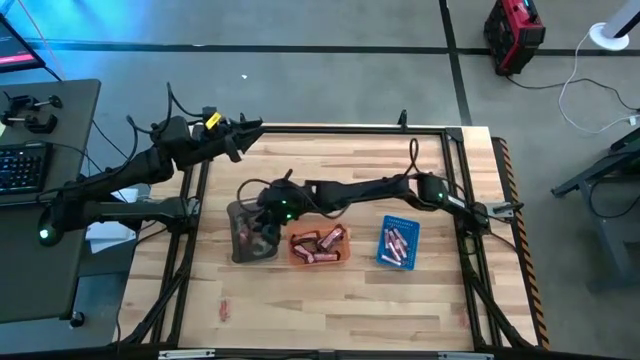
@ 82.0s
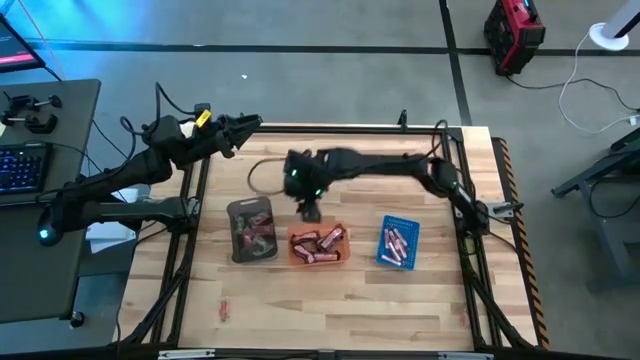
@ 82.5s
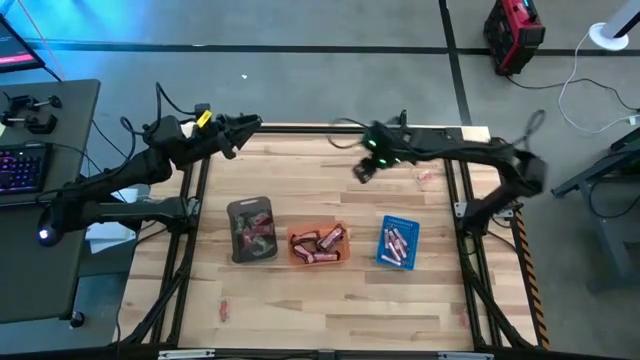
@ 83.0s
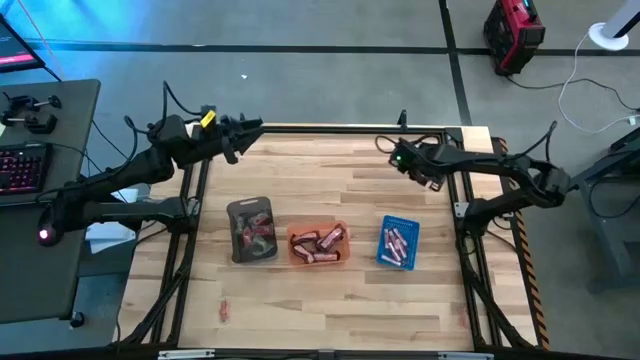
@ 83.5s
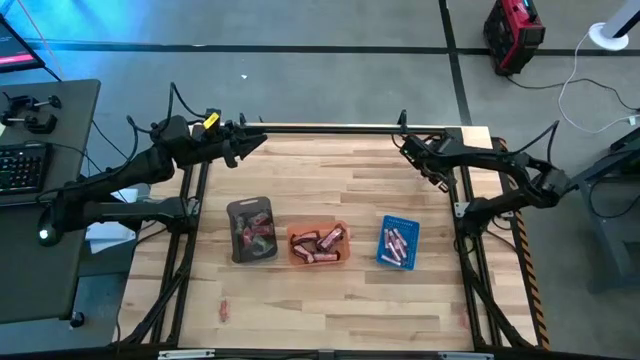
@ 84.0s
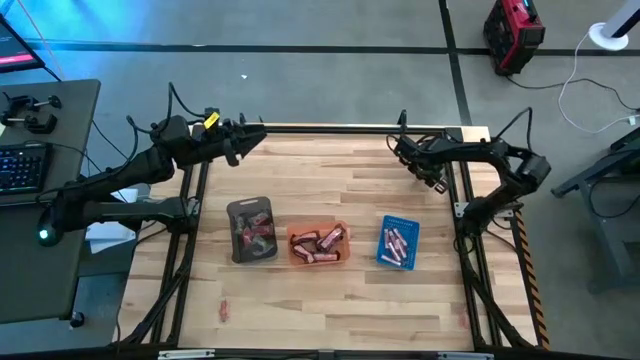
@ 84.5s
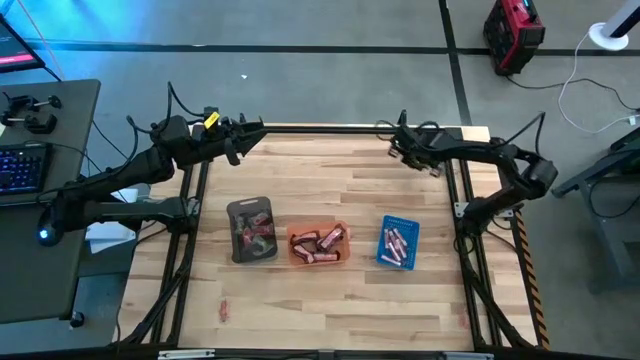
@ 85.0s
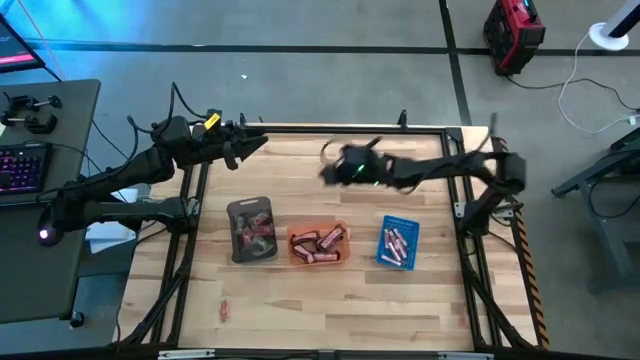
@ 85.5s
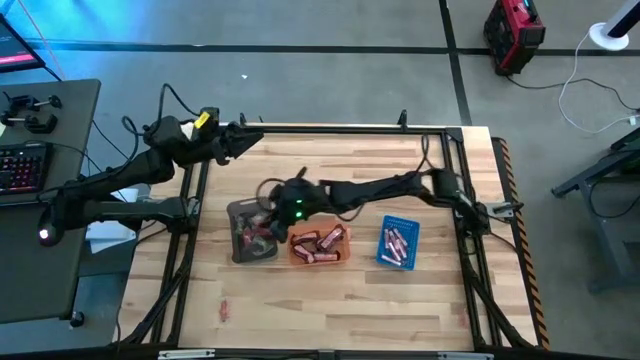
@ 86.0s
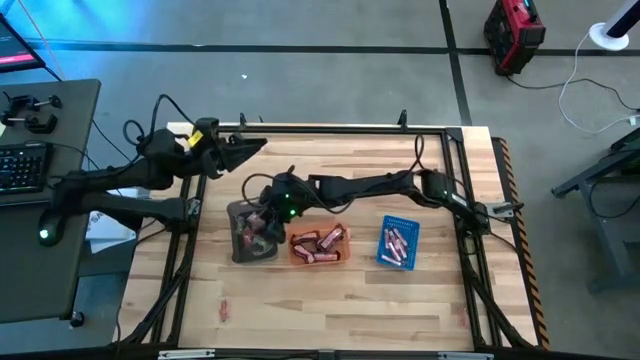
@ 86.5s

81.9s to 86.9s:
Task: Sort candy by brand, put in halloween buckets
Put the orange gummy into the black bin

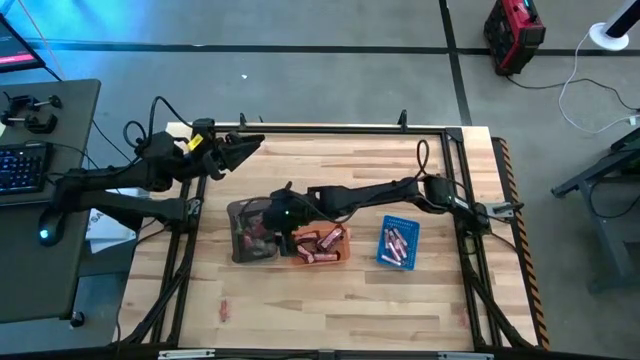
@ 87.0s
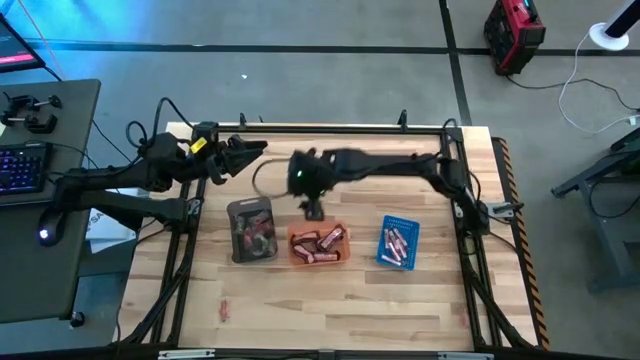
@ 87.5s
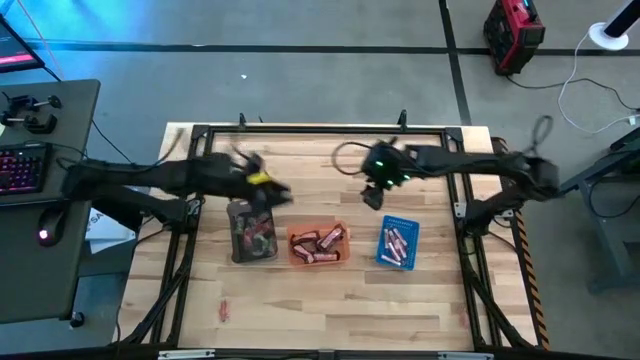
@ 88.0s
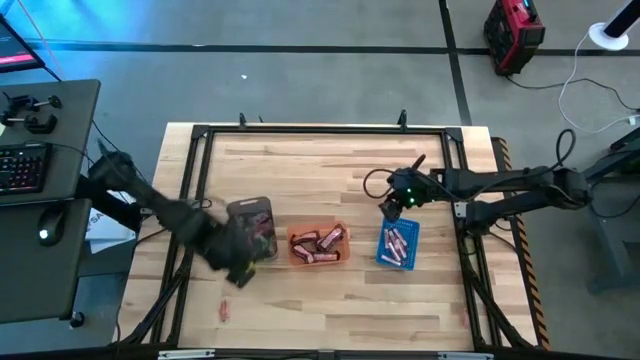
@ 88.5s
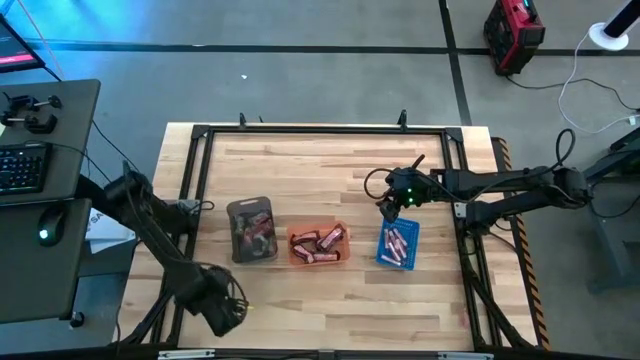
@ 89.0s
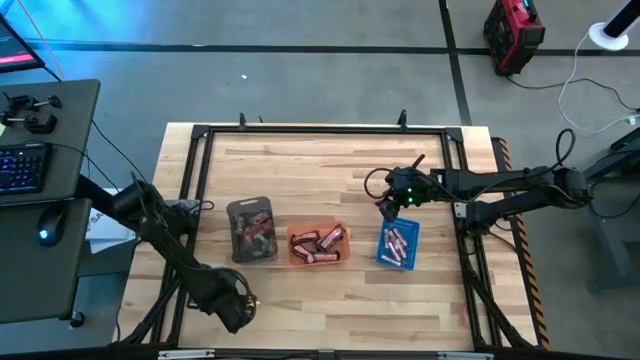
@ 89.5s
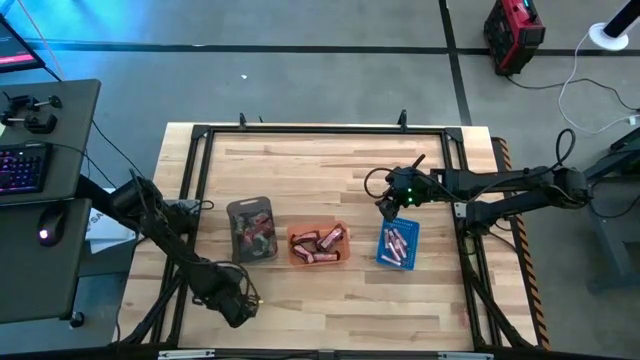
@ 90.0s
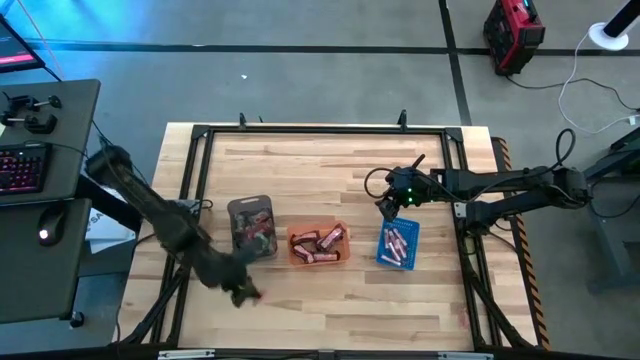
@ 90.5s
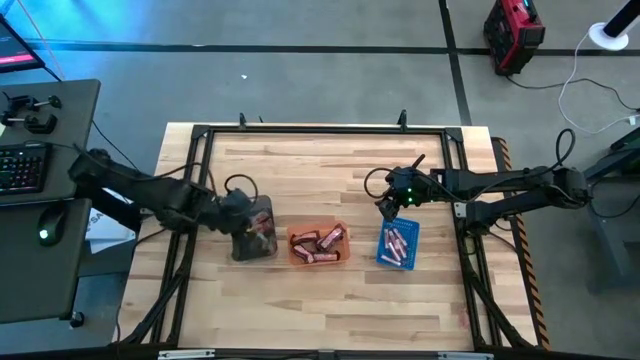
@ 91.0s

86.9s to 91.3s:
Put the orange gummy into the black bin

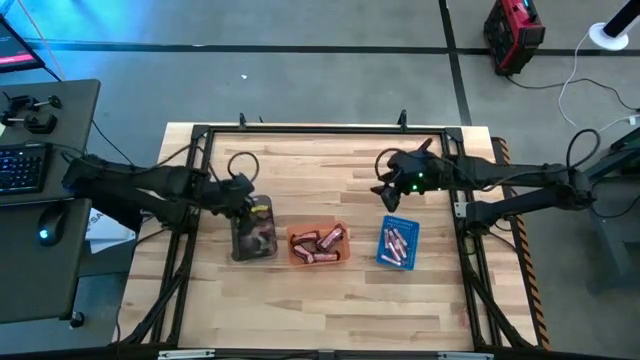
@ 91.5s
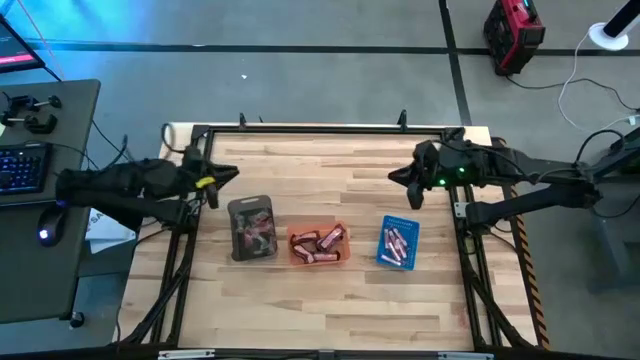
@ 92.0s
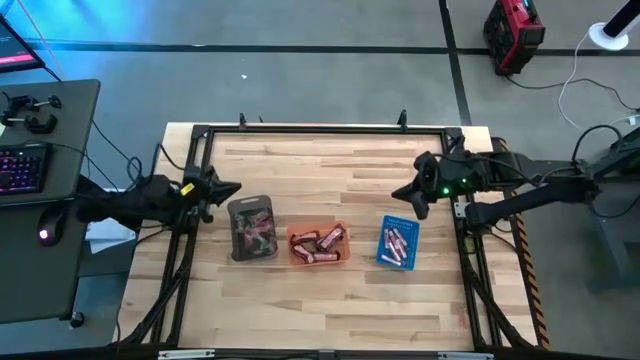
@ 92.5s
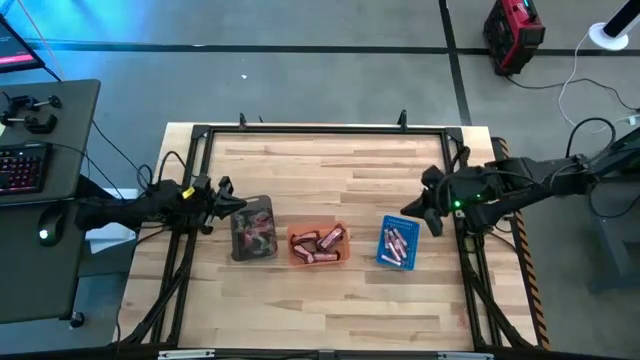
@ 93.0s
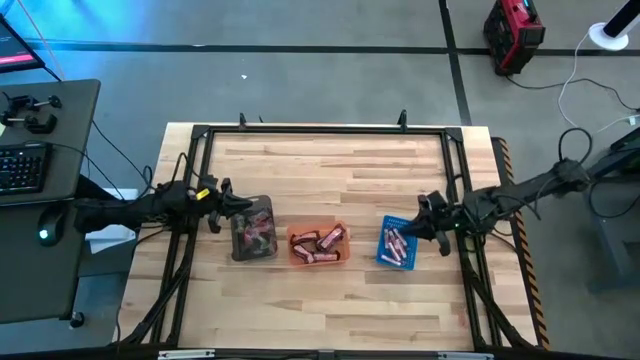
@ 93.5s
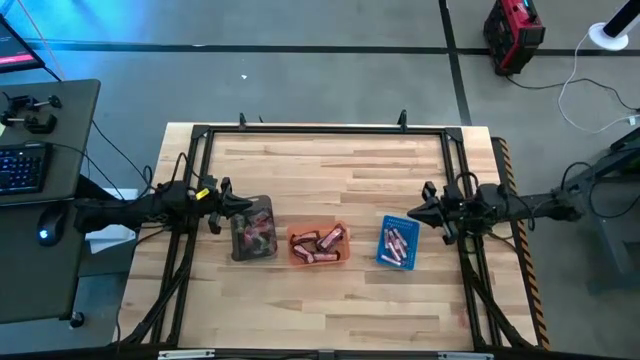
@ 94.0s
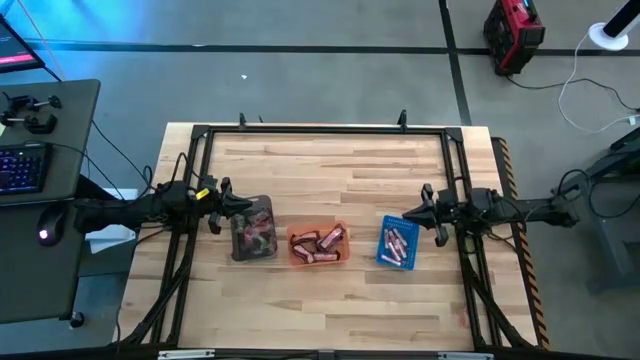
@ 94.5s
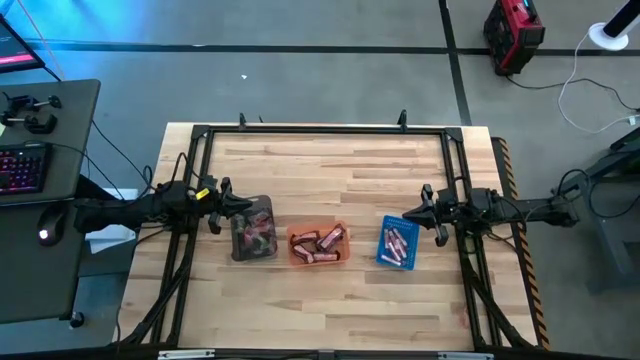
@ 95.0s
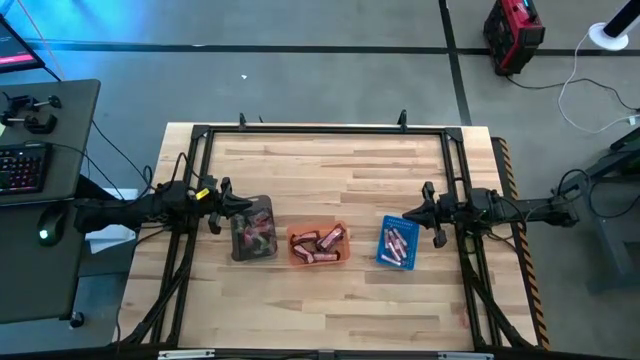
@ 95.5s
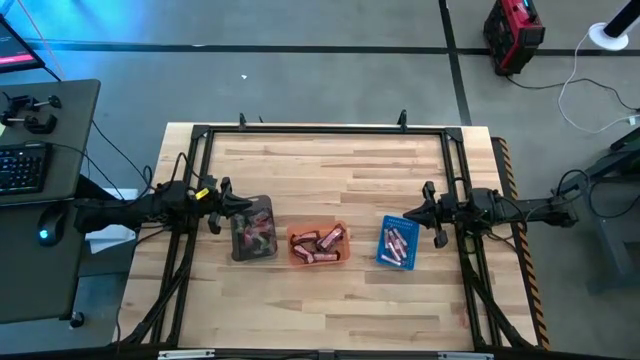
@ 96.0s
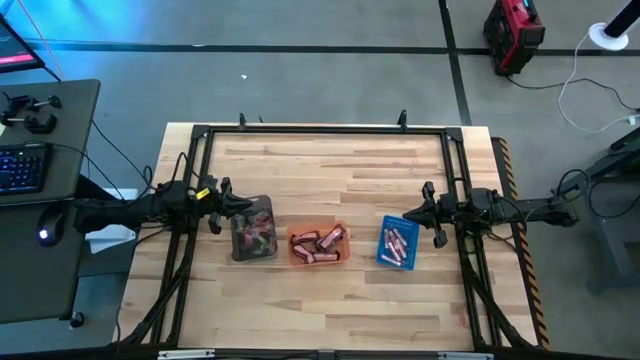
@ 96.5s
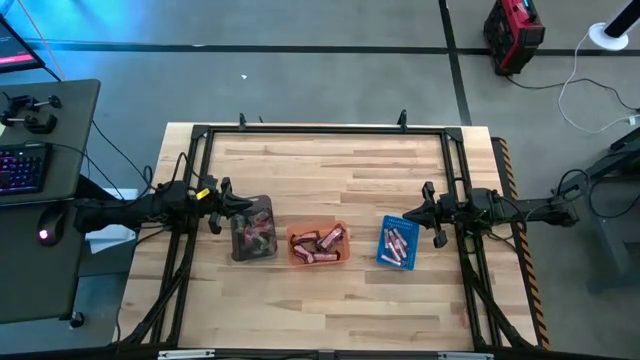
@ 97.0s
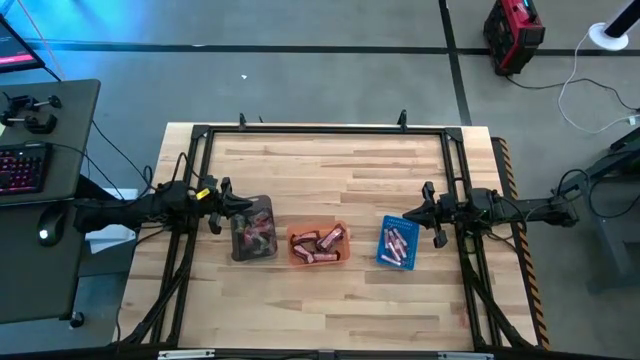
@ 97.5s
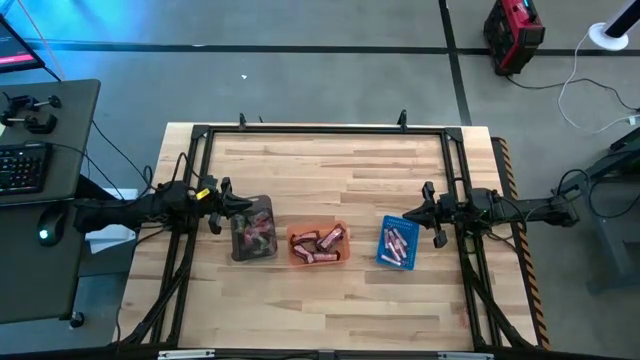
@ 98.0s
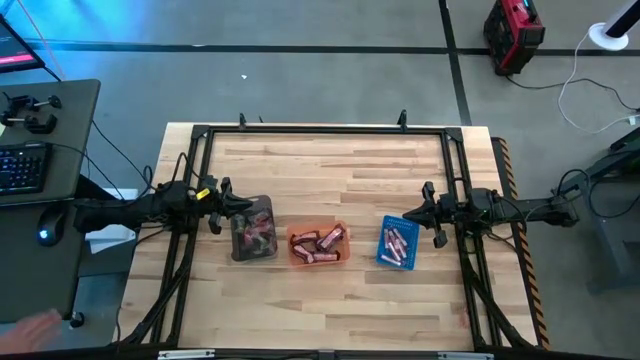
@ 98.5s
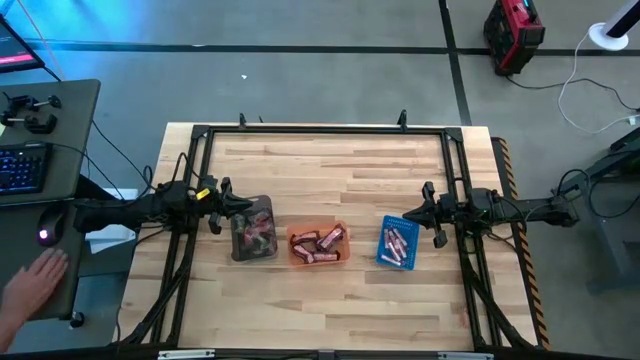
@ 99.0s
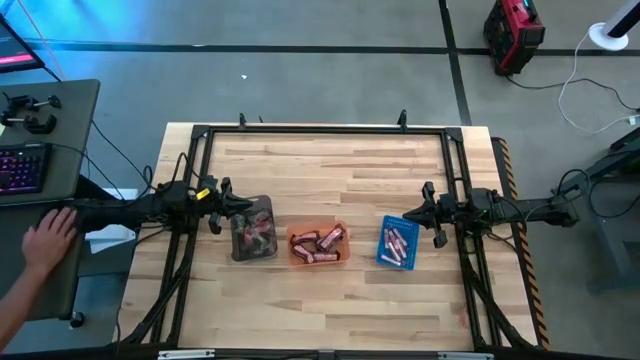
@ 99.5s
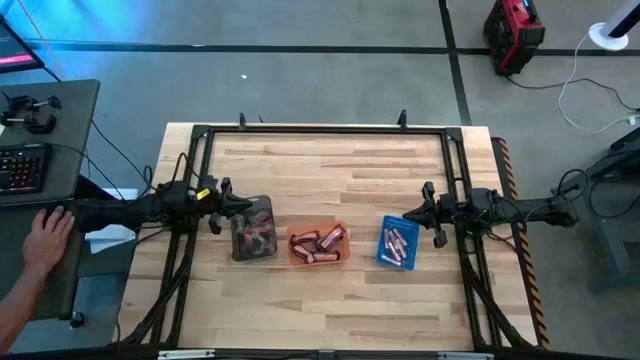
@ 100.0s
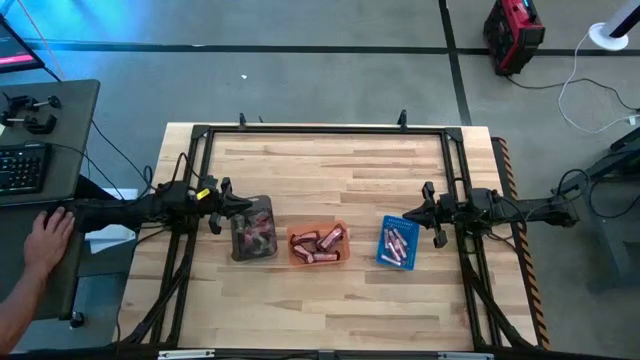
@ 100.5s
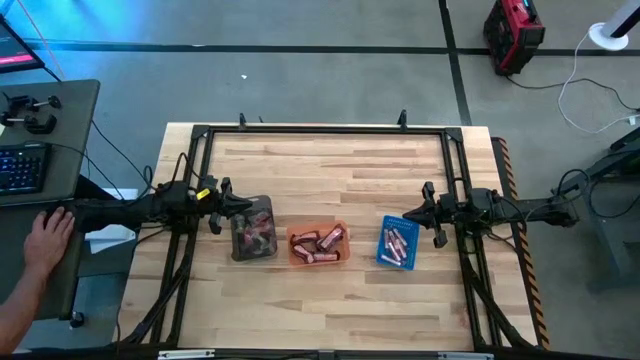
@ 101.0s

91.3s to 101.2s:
Return to Home Position

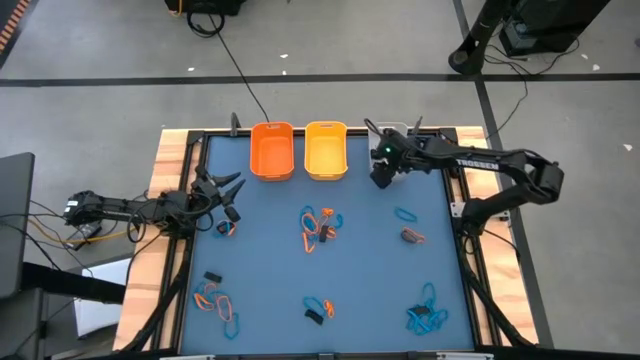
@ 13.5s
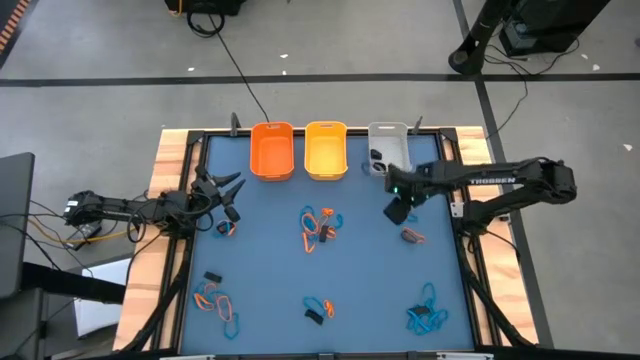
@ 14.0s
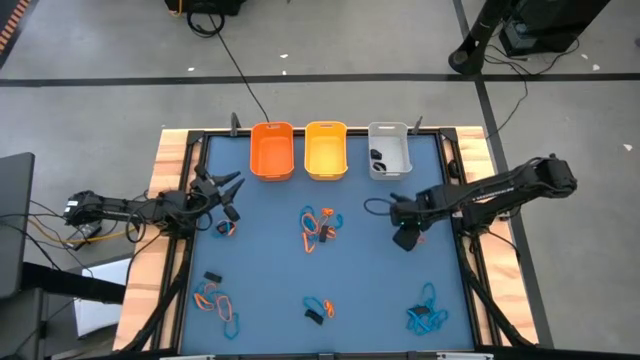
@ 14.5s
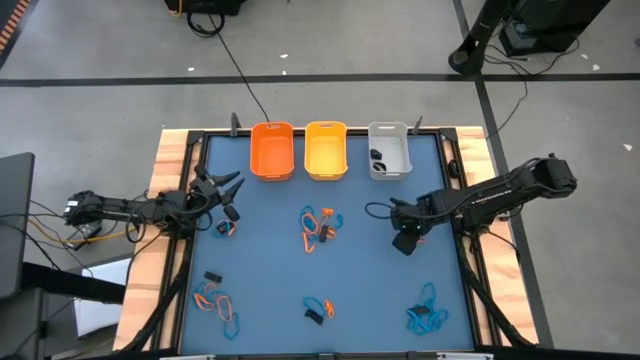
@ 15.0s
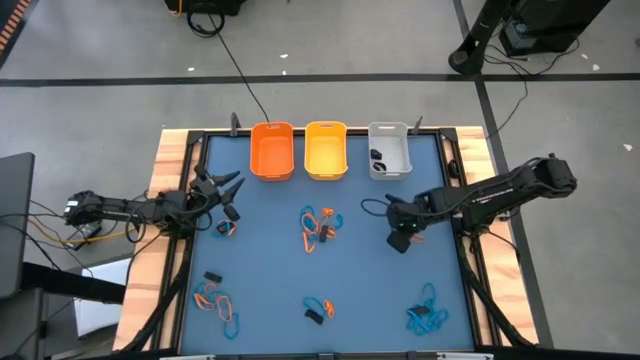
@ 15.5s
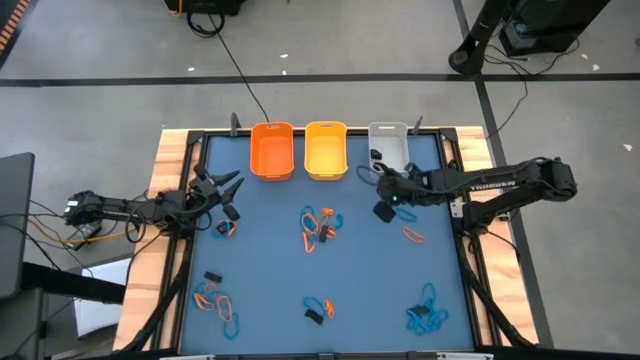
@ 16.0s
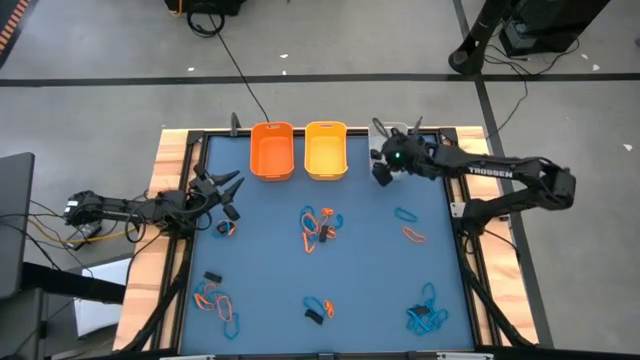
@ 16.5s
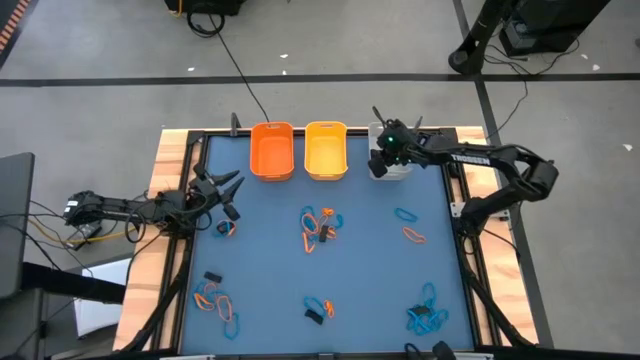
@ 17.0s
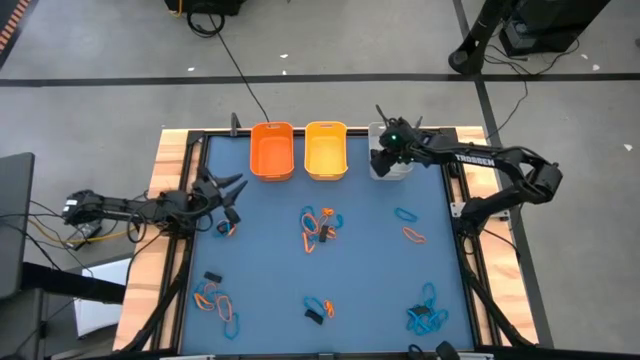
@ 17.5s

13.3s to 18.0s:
Task: Sort rubber bands into baskets
Put the black rubber band into the gray bin
